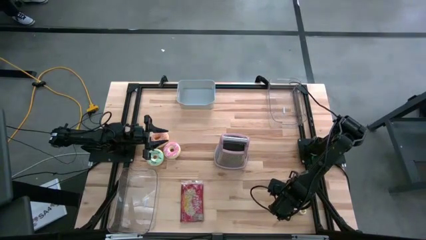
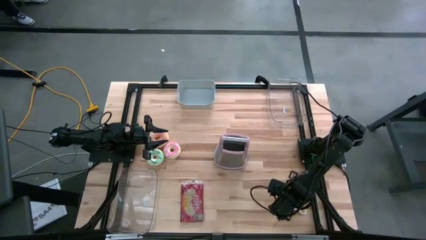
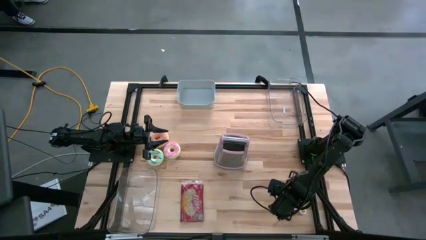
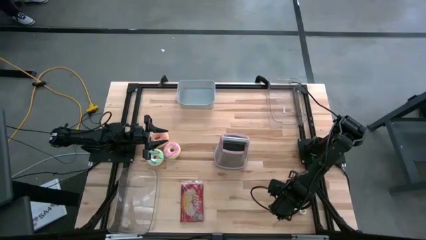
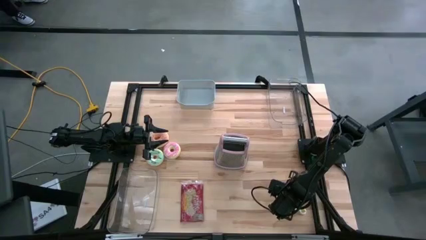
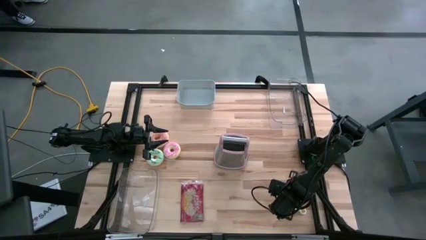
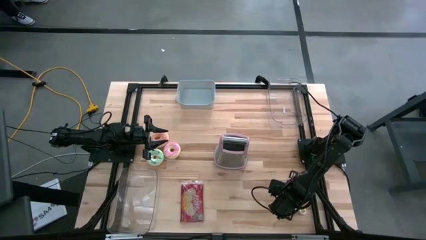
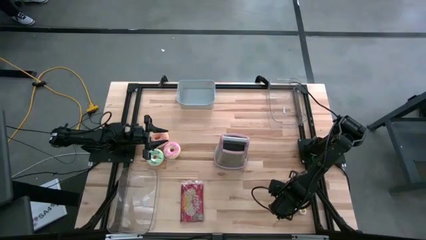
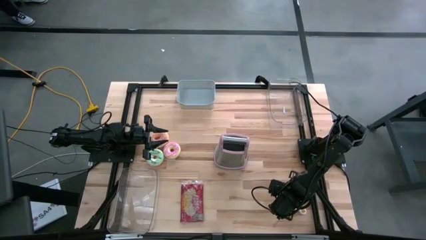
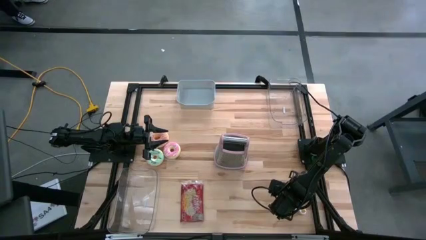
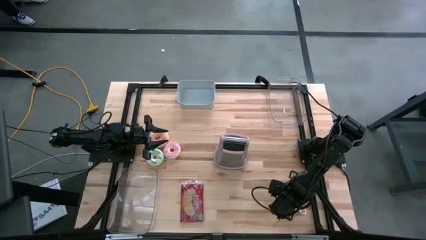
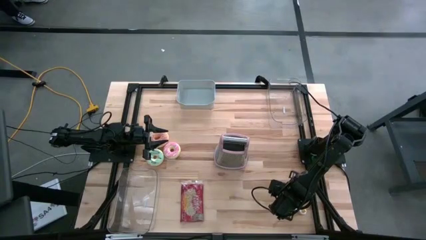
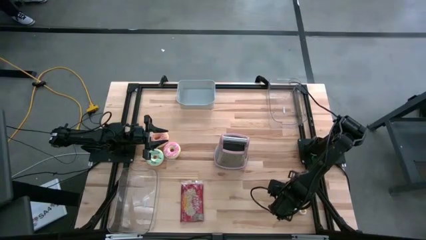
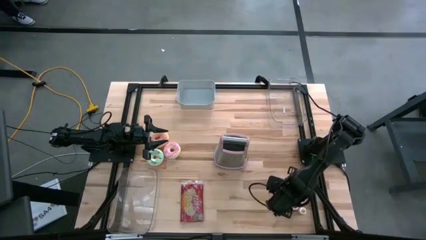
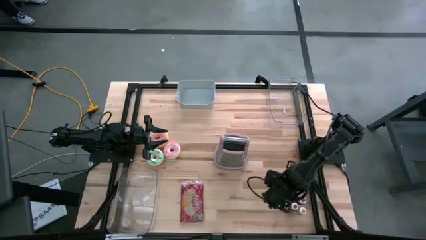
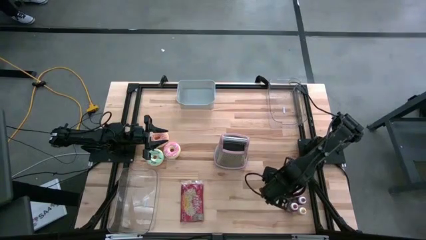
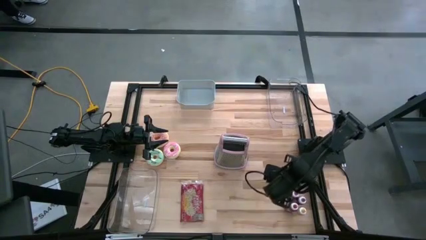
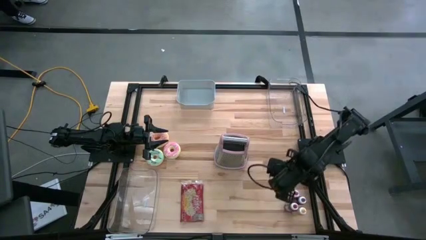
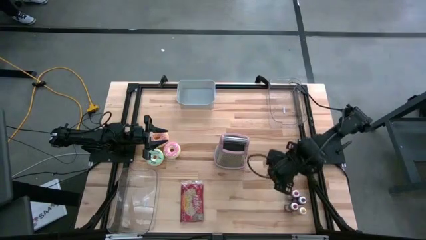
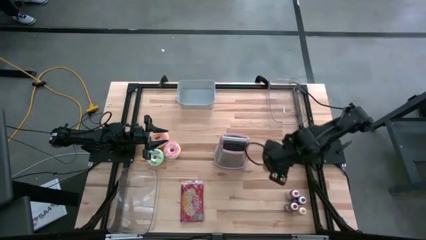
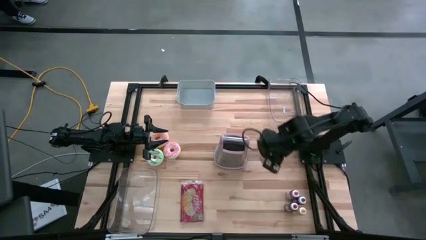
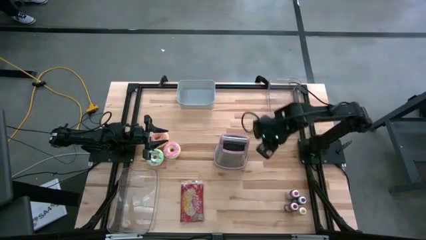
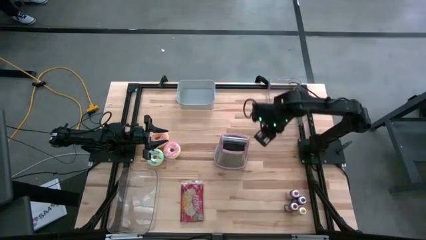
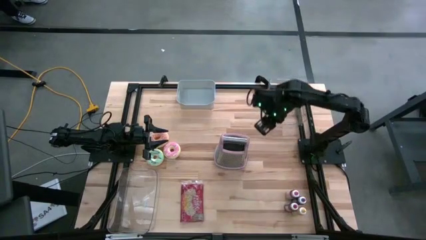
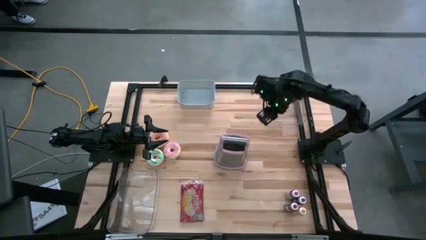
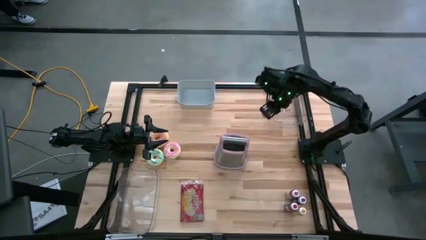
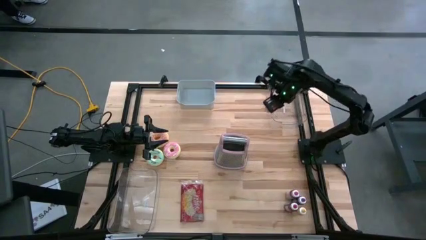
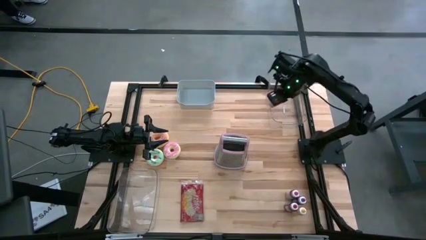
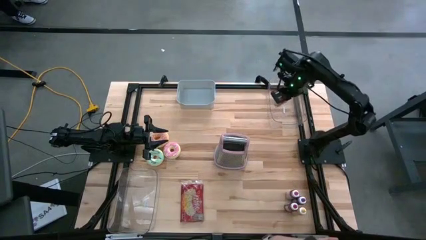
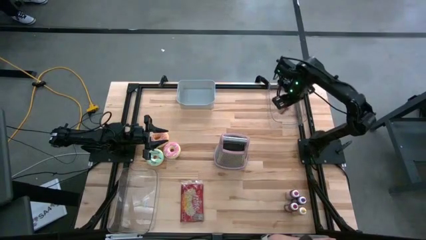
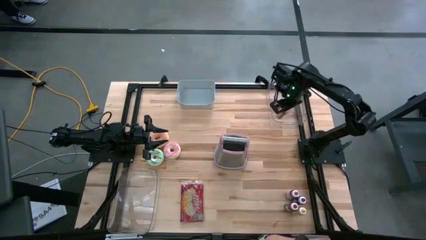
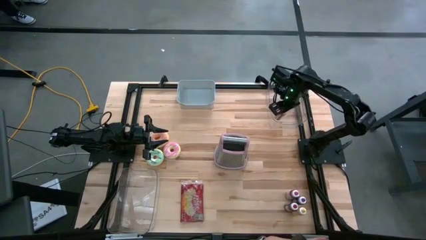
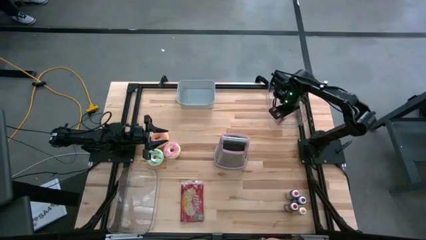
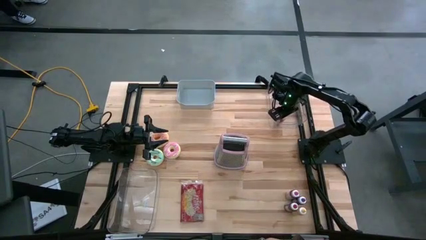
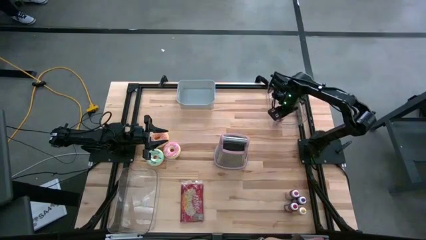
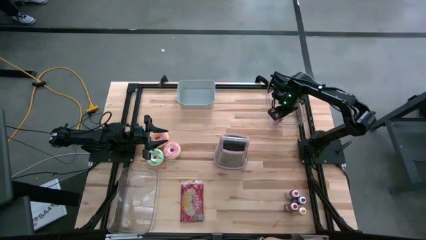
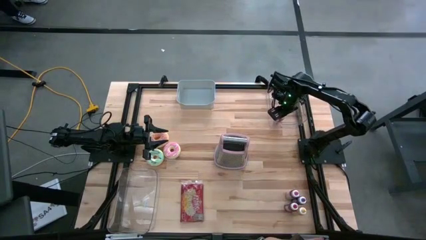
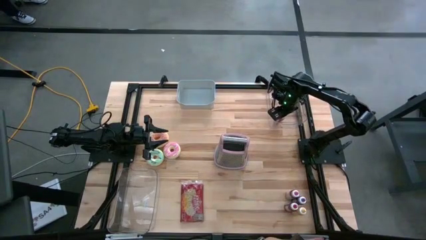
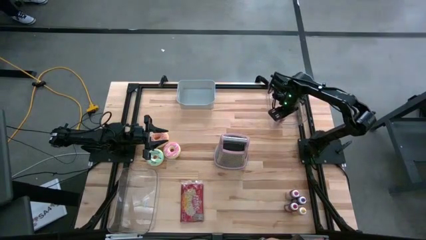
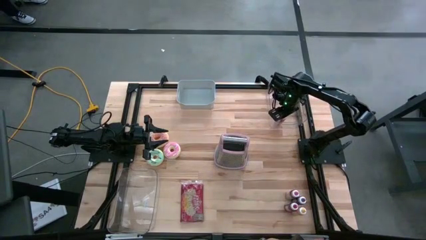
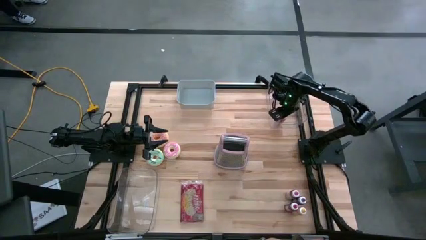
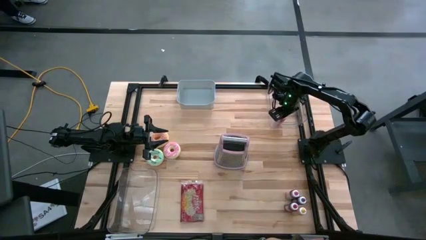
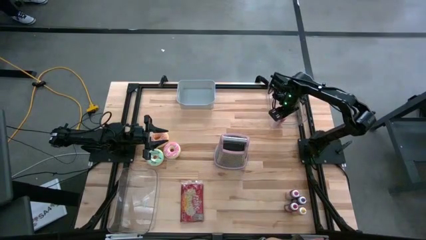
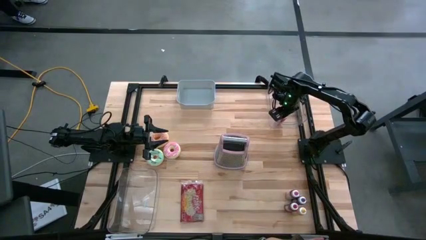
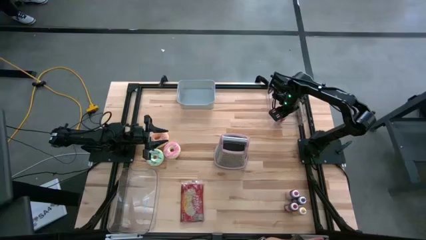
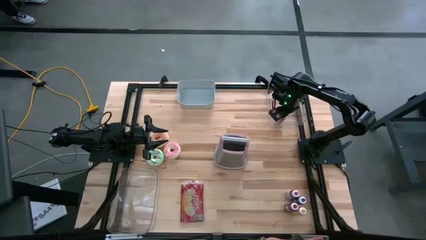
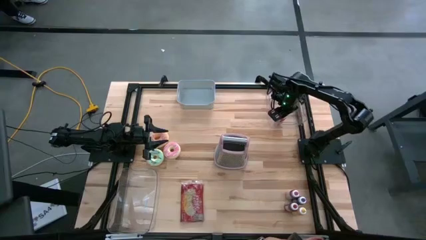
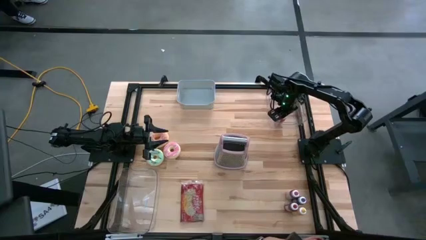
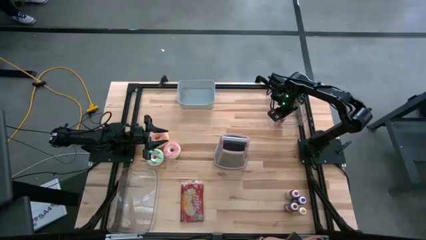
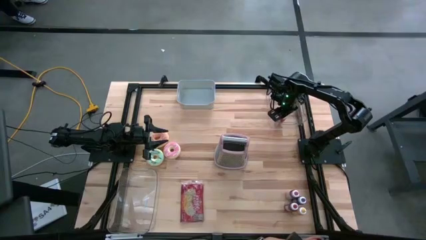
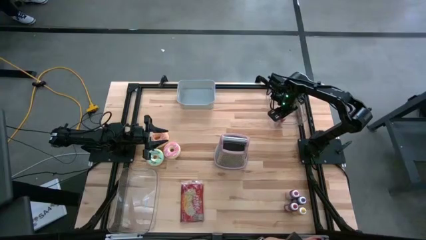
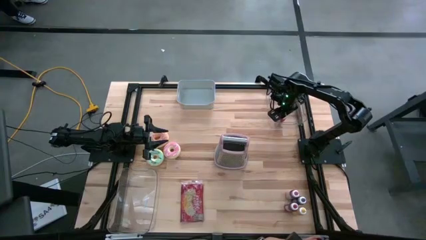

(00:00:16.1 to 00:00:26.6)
Put the orange food coloring into the right transparent bin

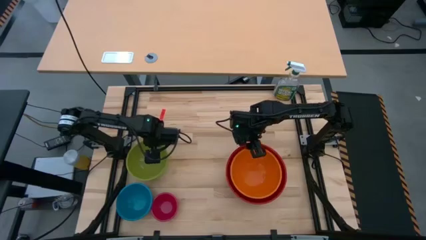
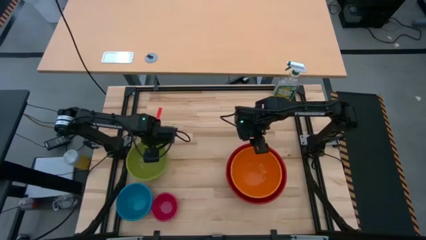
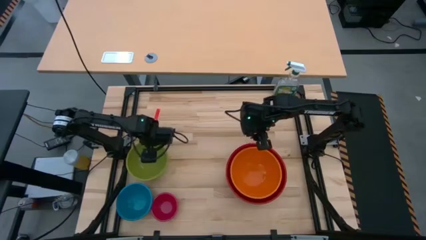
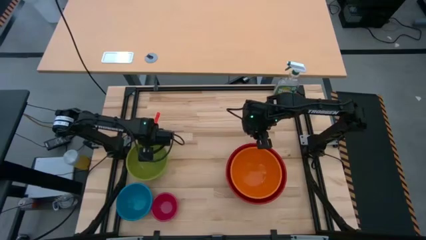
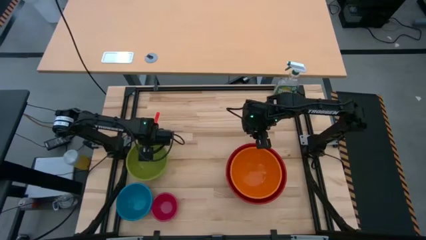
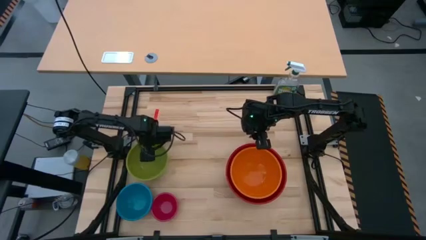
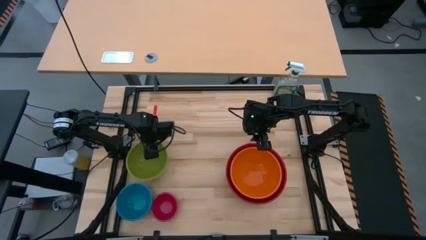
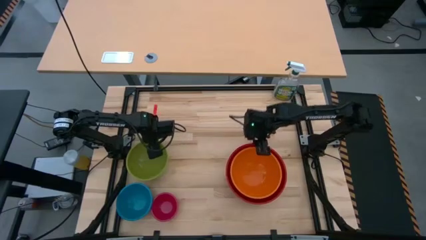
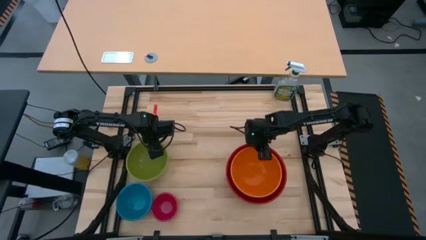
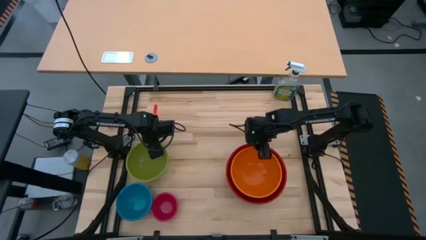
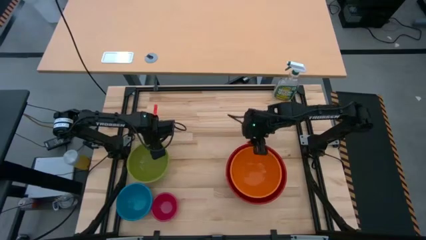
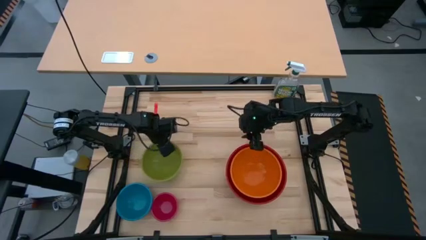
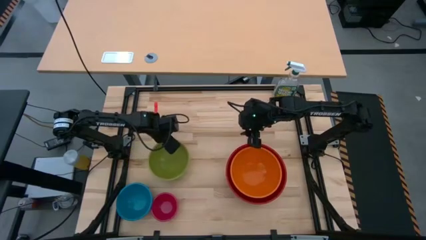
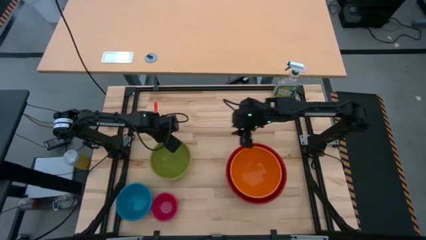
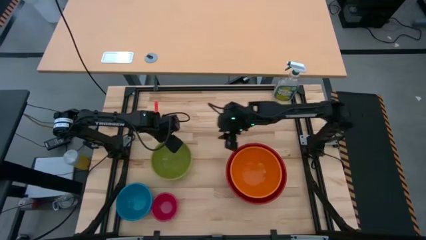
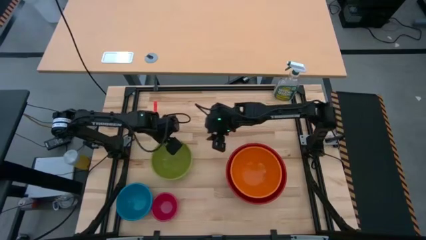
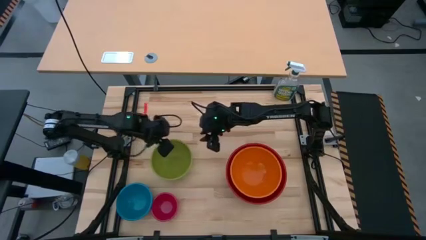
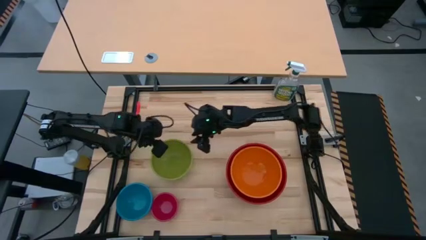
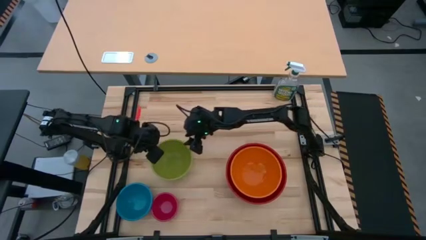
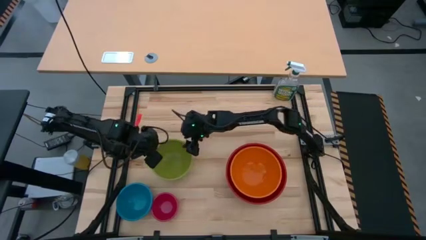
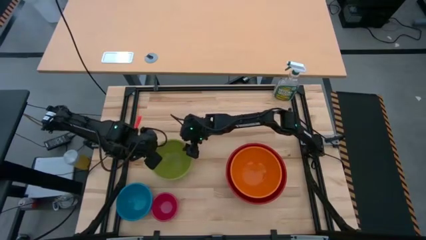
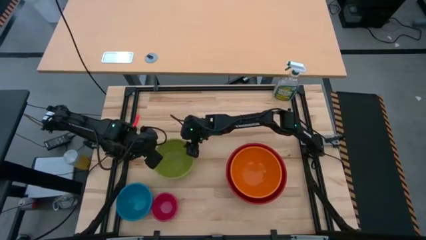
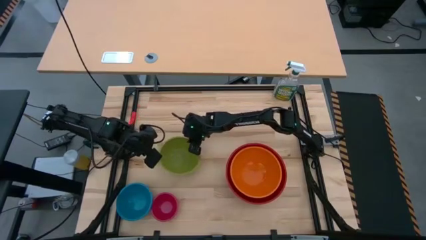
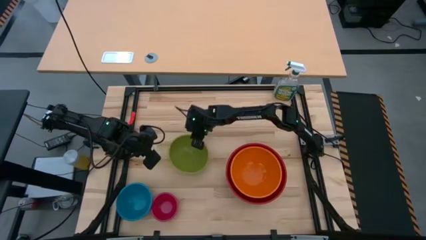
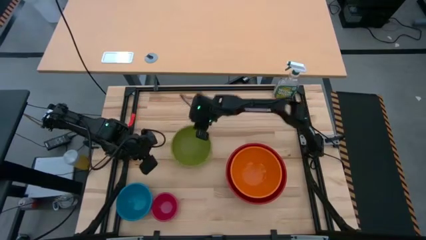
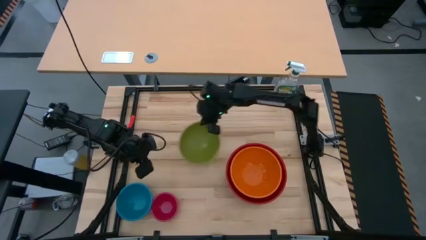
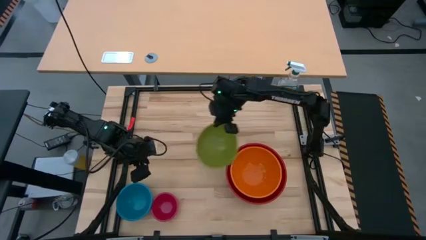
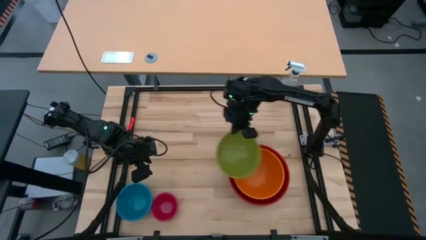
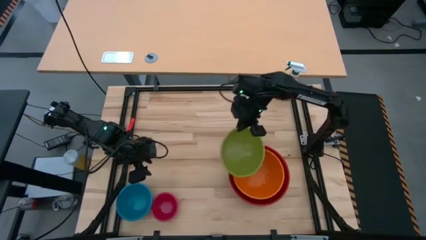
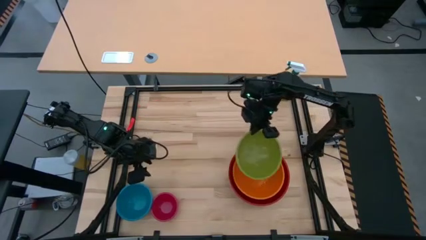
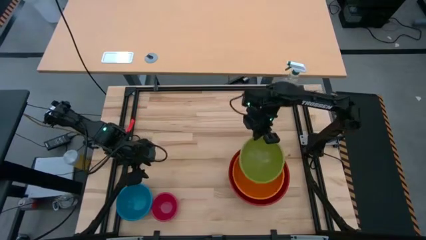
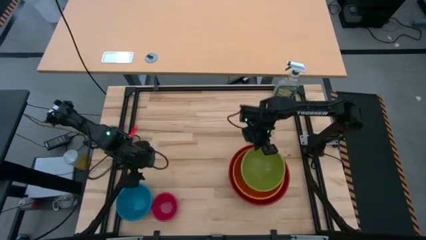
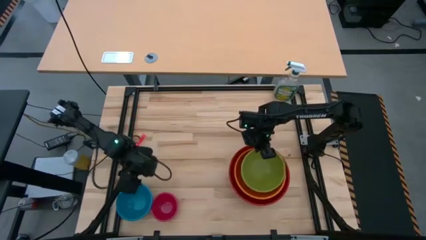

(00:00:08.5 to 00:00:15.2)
Stack the green bowl on top of the orange bowl
